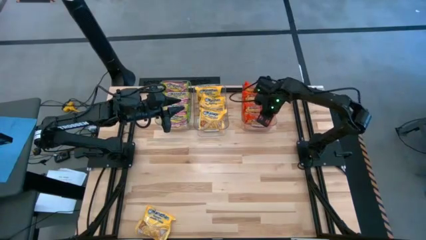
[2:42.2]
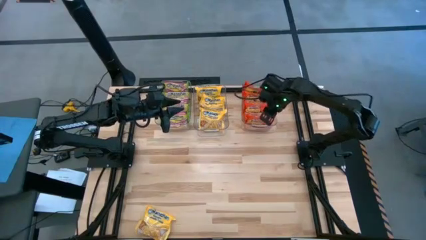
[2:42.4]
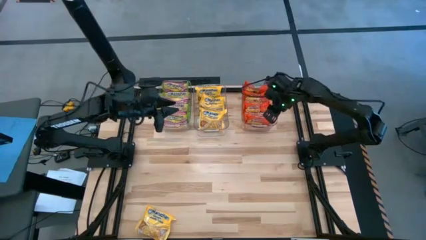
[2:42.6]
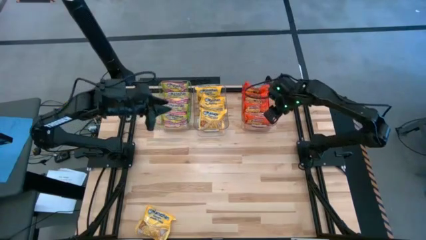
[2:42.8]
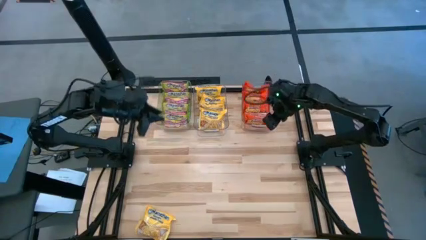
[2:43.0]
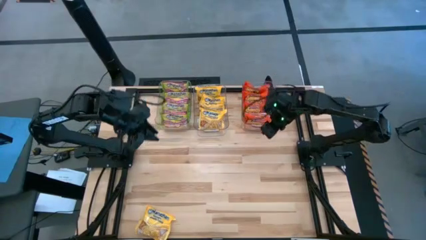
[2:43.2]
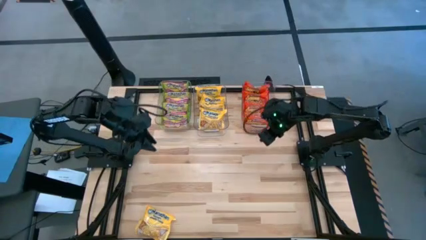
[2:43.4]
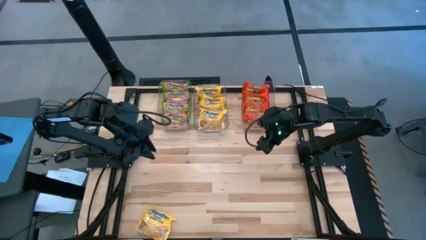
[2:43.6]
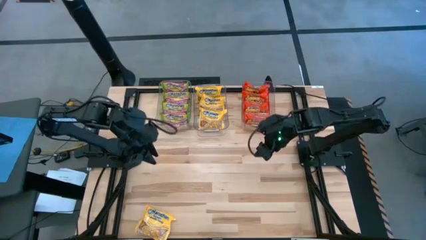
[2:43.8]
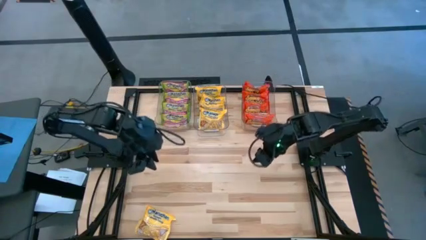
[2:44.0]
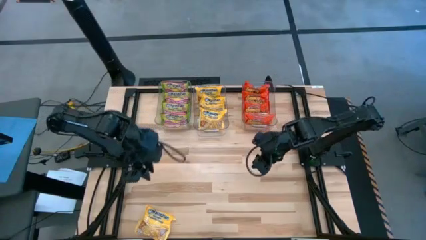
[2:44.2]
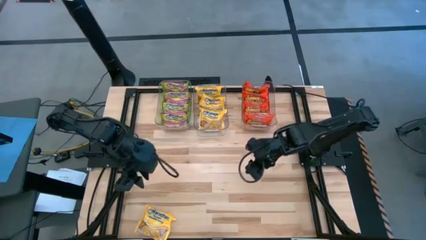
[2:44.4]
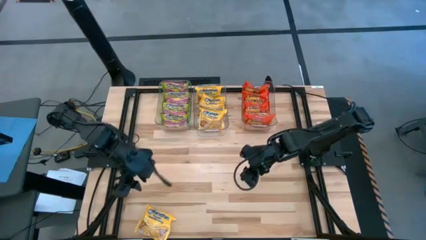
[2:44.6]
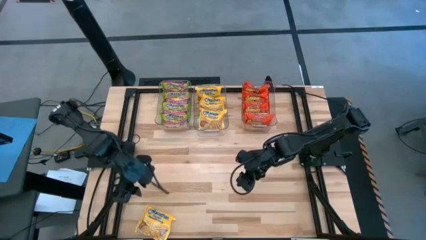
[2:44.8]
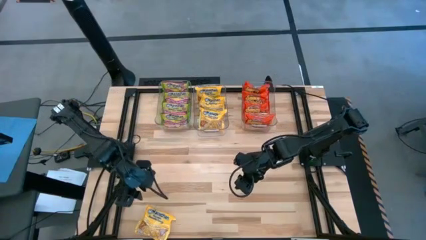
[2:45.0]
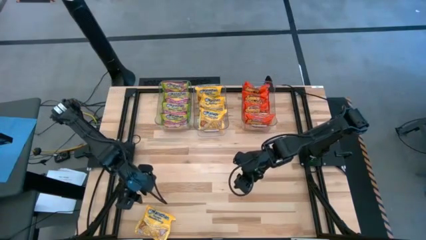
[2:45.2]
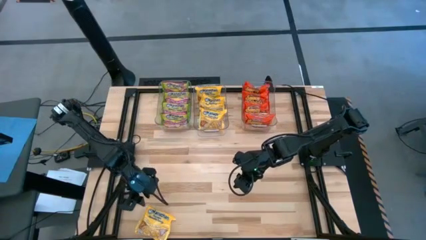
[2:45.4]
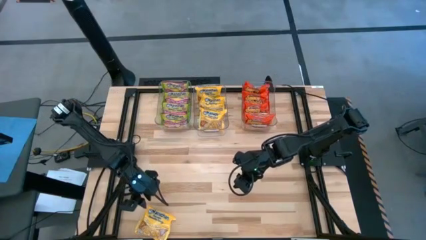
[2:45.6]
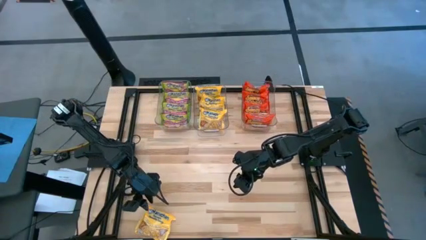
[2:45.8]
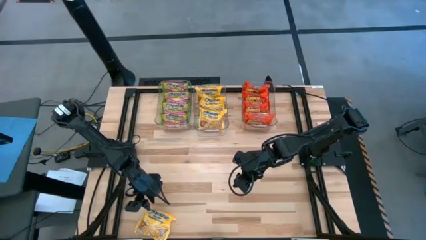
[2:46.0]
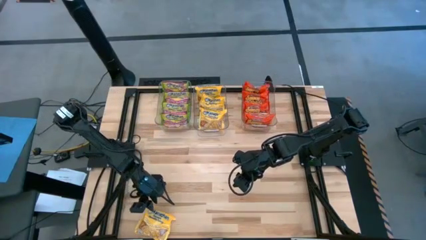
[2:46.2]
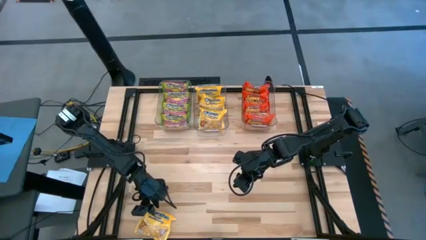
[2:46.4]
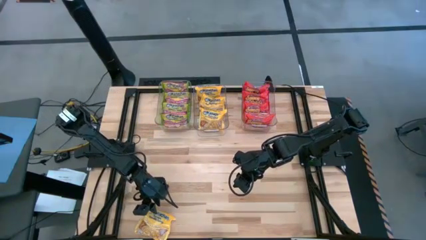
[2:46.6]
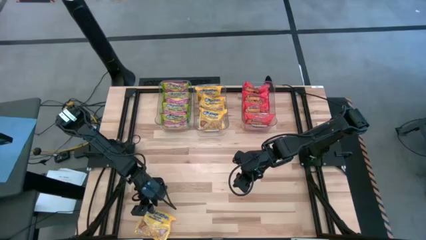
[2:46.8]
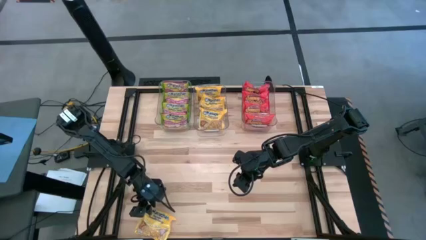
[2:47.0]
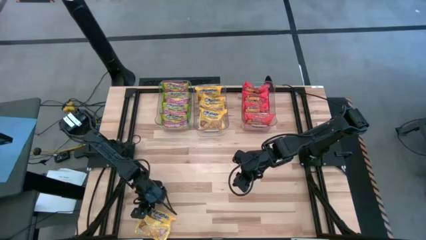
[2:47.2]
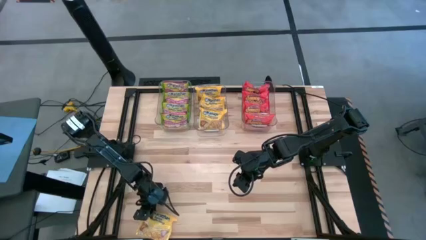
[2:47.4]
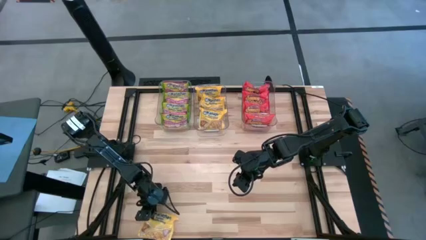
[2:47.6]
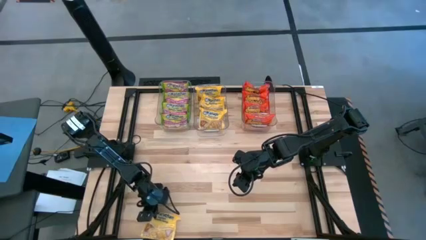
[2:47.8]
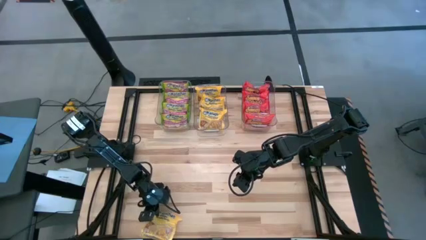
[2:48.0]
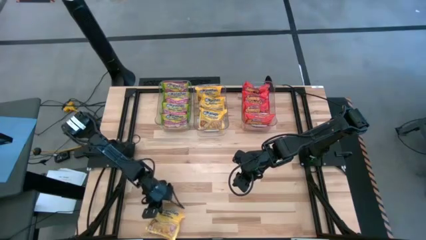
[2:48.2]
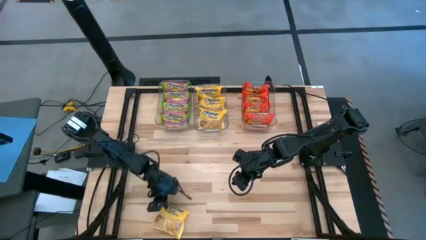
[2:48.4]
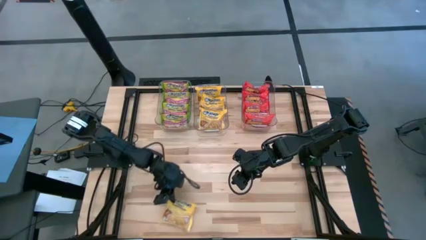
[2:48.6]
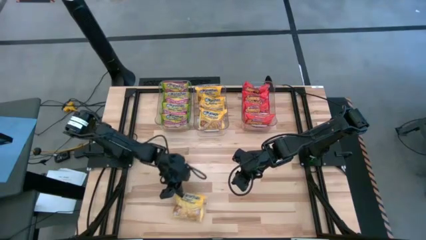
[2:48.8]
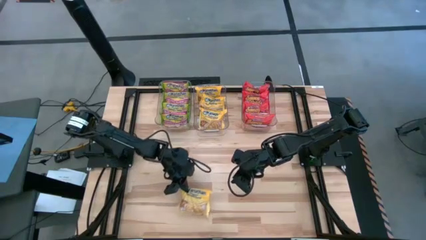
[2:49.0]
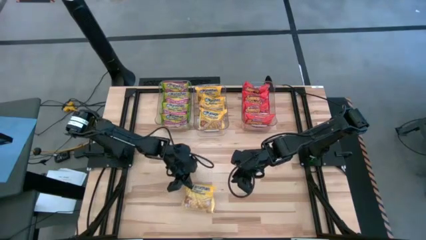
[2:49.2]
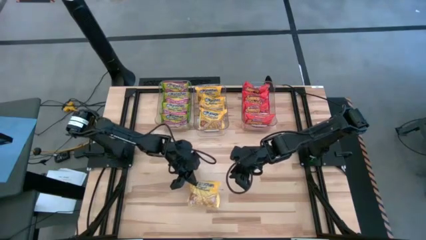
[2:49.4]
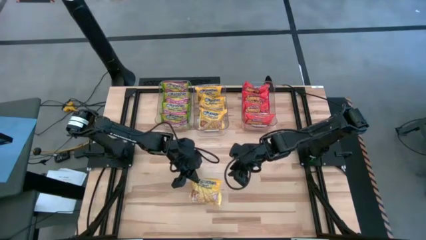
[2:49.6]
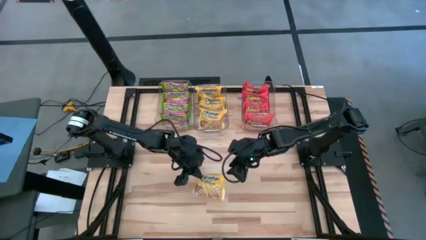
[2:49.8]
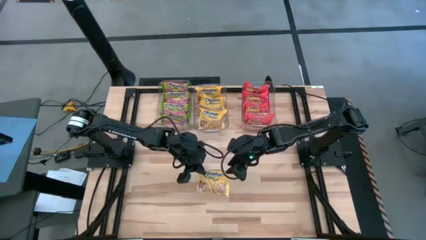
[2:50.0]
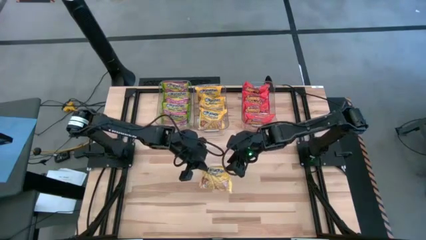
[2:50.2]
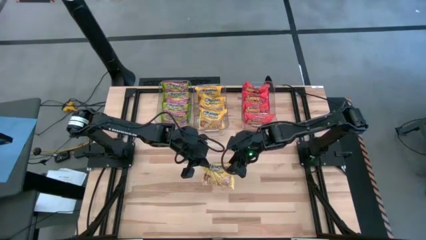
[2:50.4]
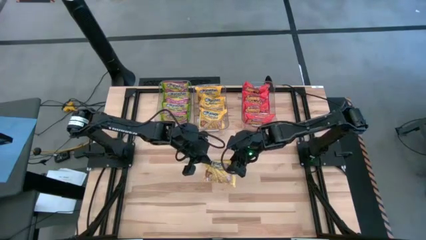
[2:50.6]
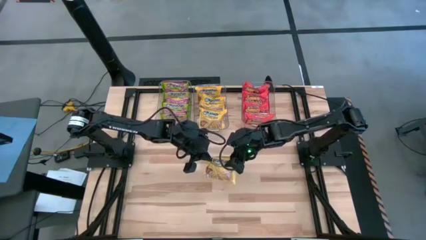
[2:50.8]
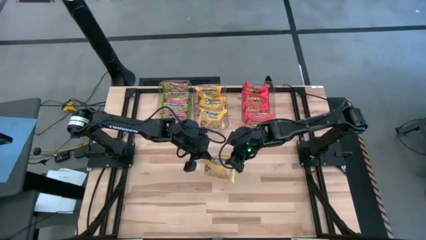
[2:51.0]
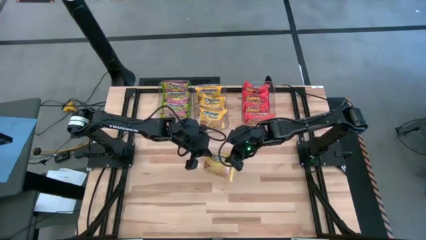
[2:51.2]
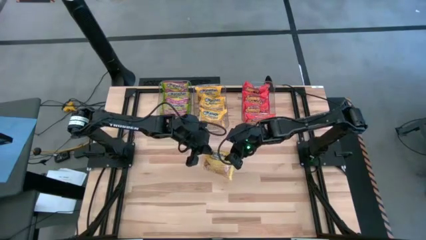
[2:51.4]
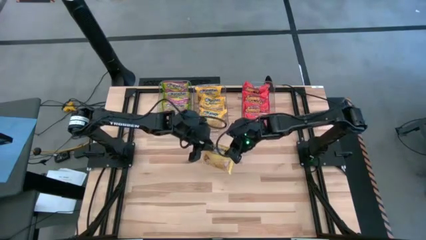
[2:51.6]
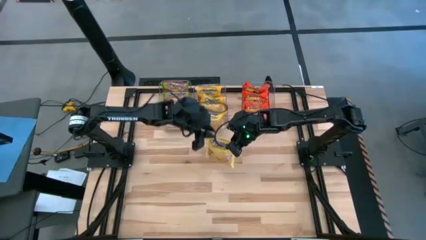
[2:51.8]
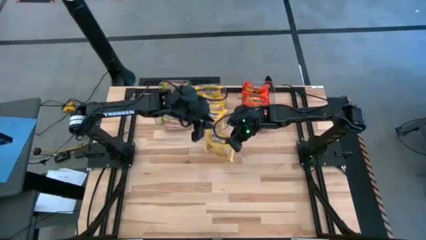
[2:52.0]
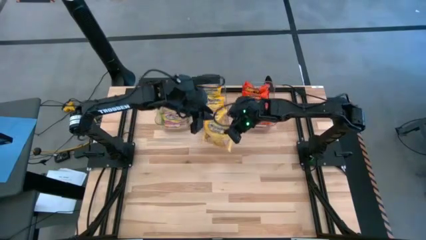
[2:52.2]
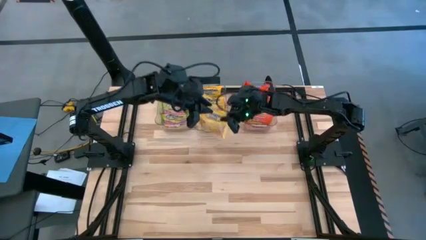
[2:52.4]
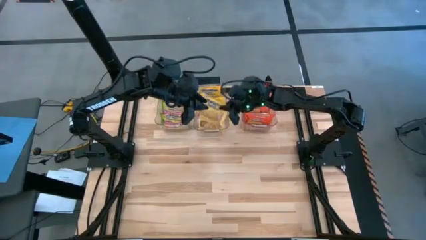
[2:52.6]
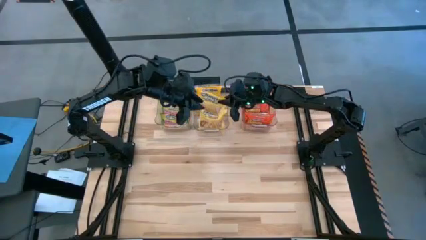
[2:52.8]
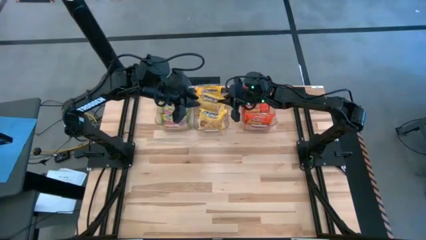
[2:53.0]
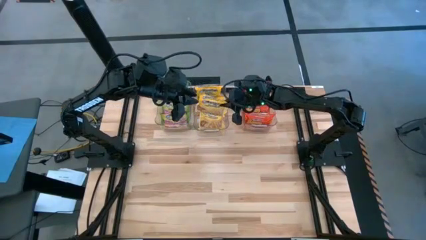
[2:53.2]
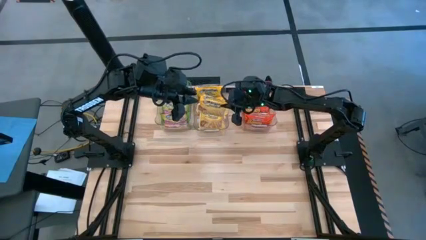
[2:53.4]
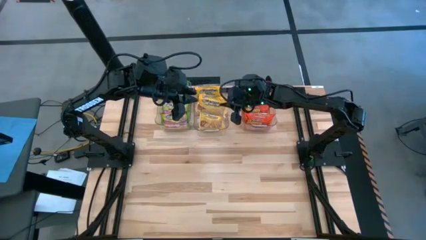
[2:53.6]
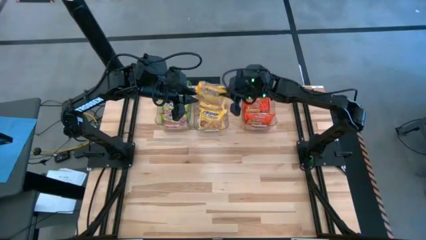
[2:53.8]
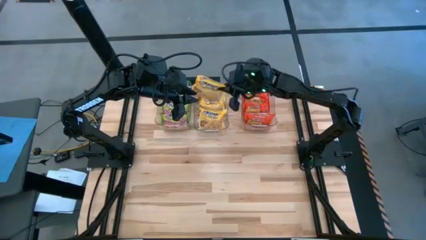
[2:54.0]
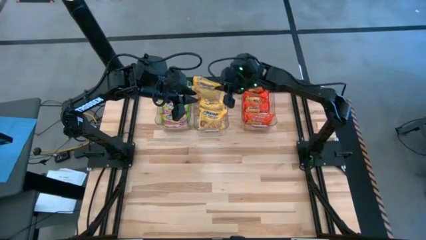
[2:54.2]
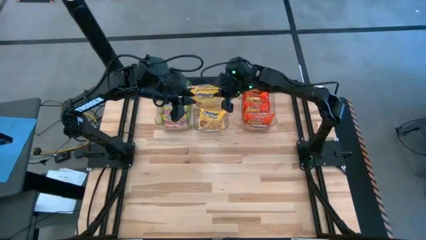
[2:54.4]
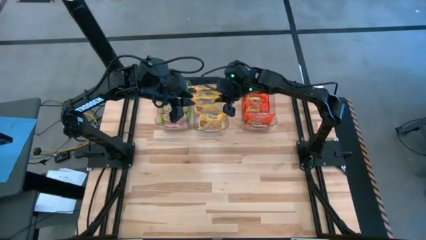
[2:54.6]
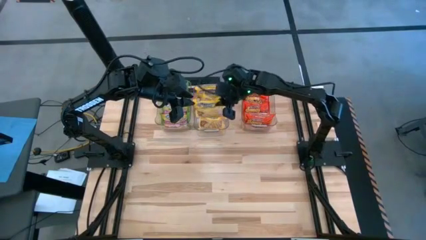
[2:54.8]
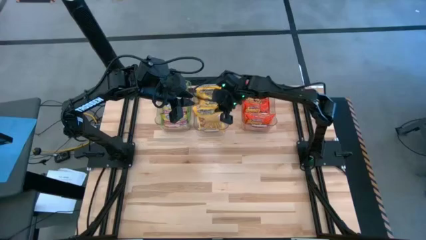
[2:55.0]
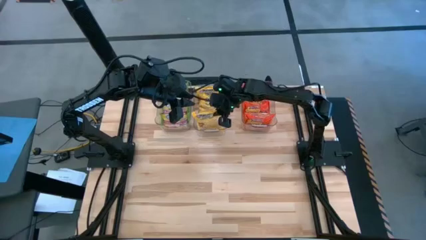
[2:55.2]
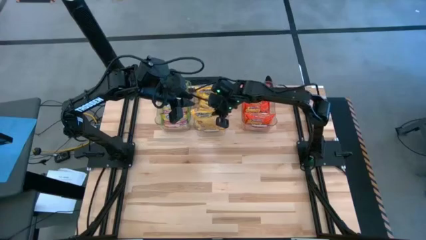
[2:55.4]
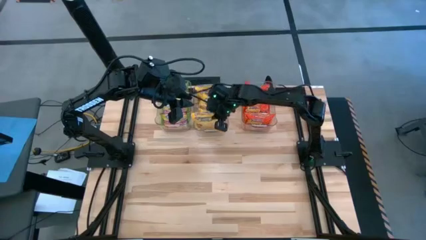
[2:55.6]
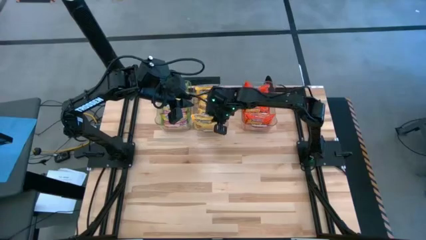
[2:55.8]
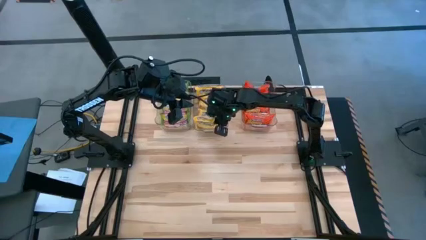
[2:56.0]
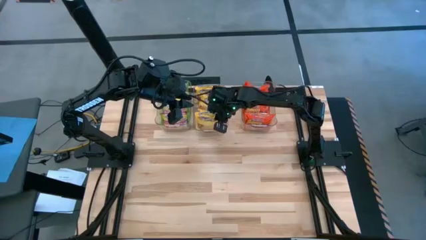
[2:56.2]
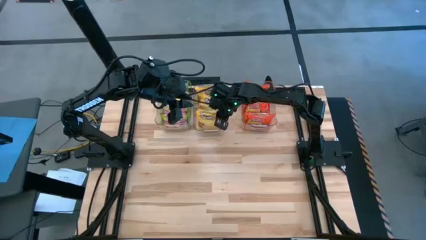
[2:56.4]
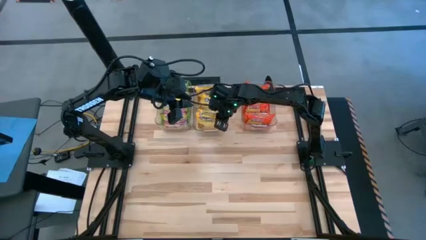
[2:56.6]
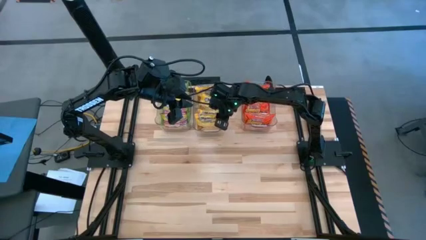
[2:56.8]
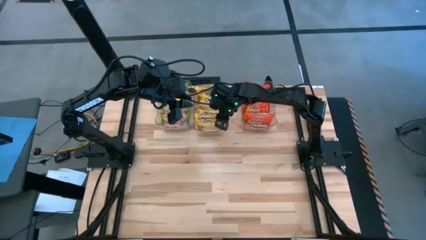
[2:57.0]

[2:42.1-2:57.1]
Task: Sort Maruchan noodles
Put the yellow noodle pack into the middle transparent bin
